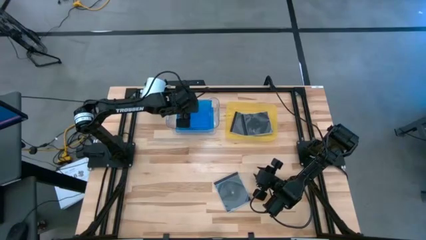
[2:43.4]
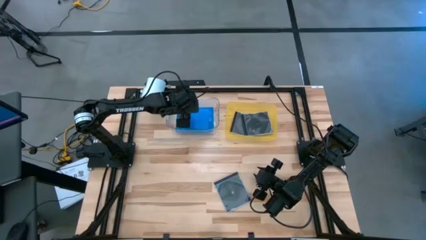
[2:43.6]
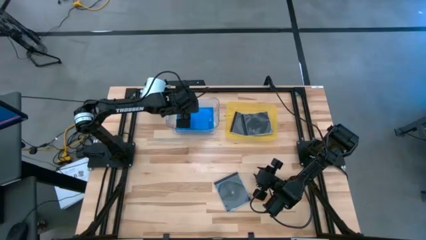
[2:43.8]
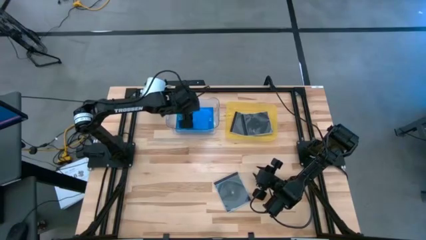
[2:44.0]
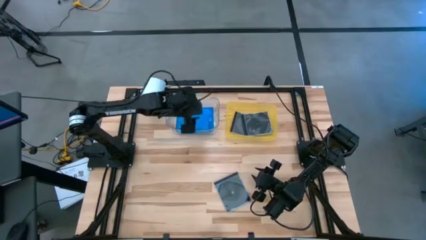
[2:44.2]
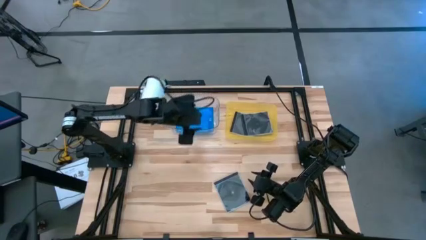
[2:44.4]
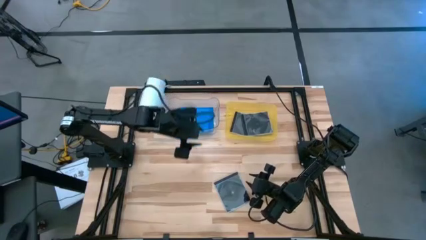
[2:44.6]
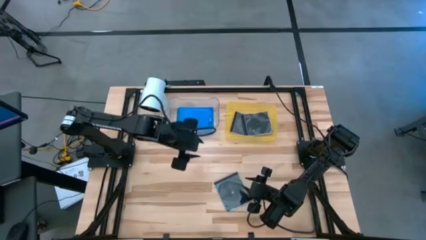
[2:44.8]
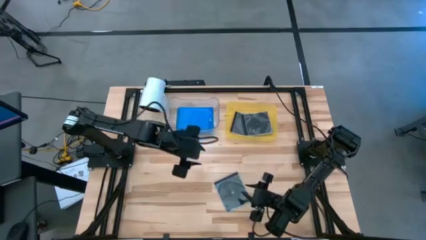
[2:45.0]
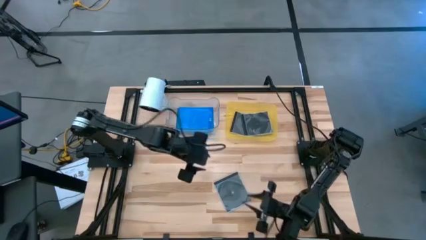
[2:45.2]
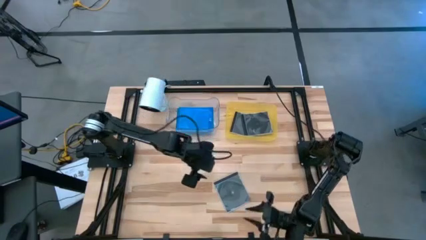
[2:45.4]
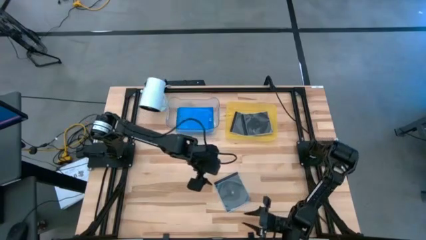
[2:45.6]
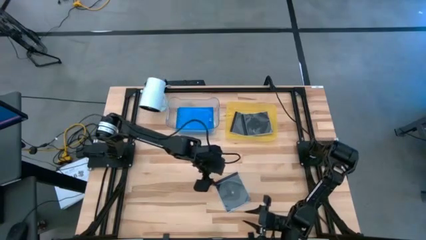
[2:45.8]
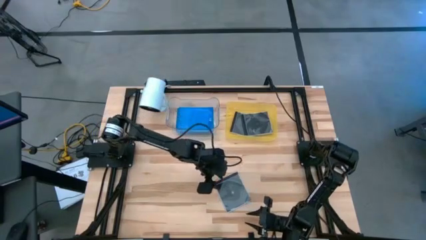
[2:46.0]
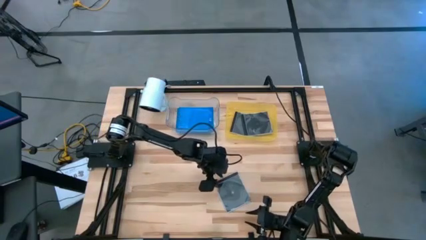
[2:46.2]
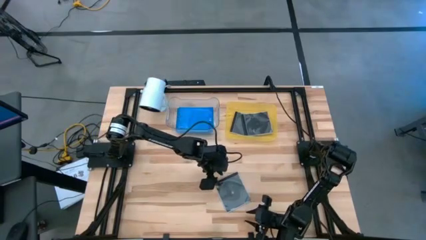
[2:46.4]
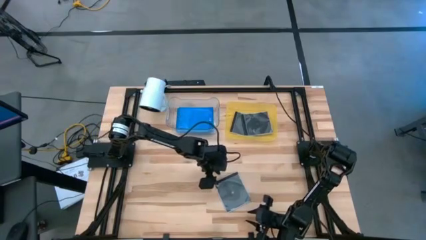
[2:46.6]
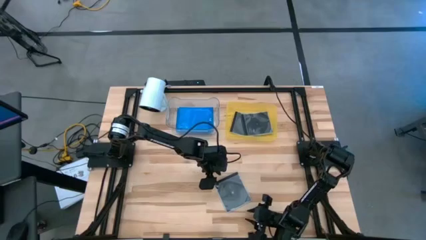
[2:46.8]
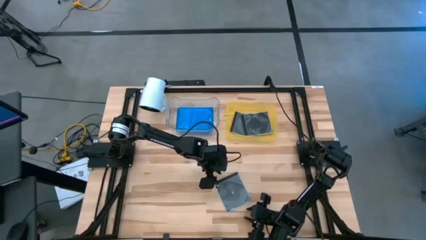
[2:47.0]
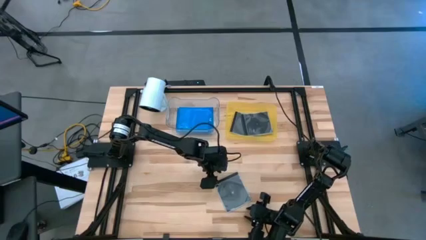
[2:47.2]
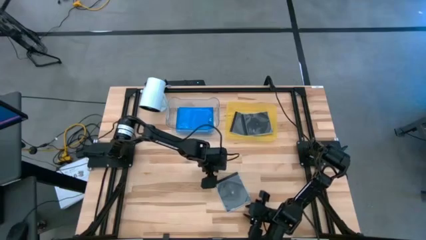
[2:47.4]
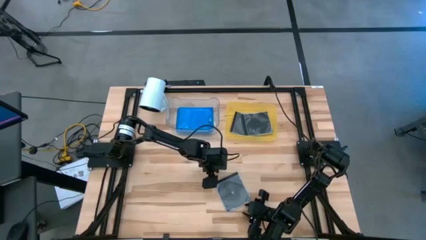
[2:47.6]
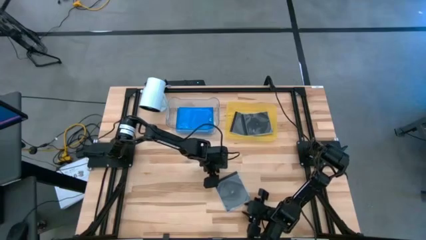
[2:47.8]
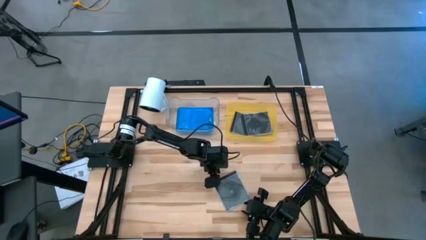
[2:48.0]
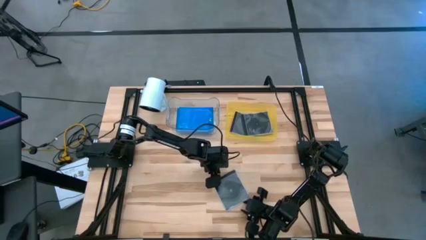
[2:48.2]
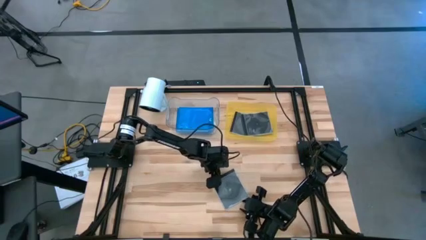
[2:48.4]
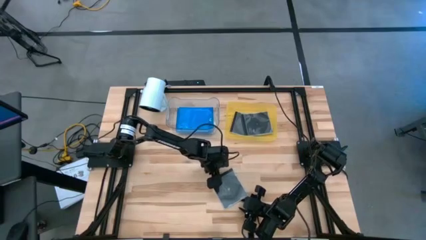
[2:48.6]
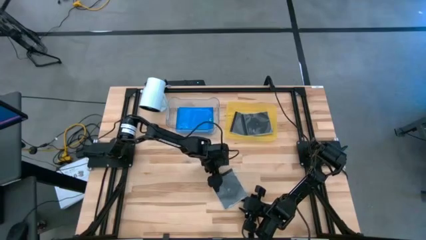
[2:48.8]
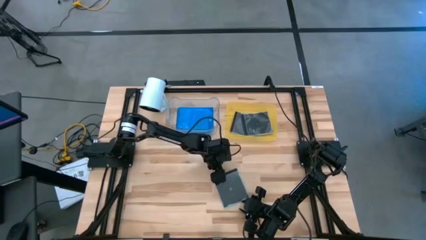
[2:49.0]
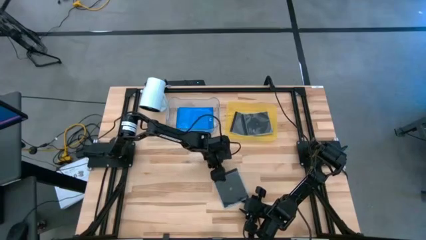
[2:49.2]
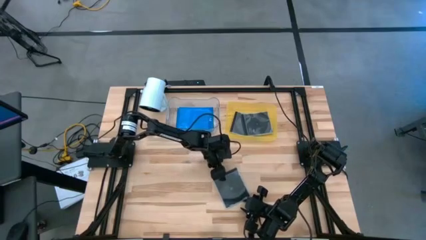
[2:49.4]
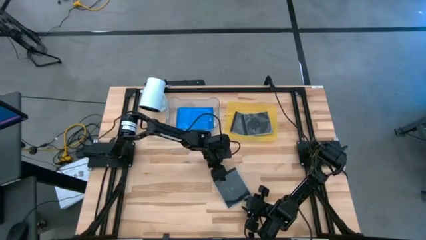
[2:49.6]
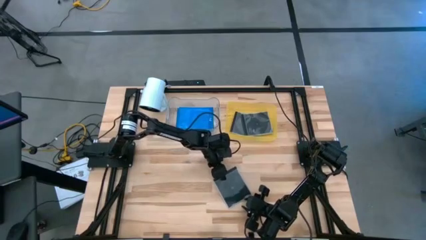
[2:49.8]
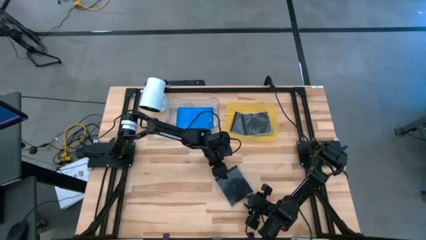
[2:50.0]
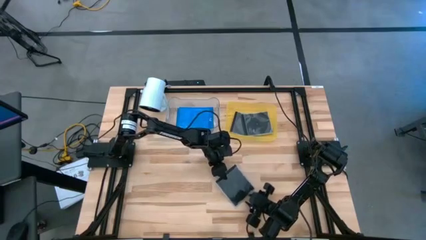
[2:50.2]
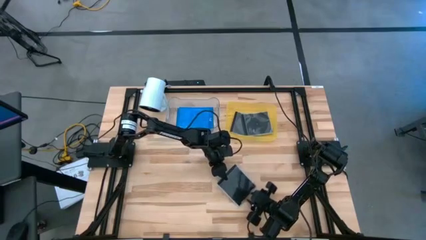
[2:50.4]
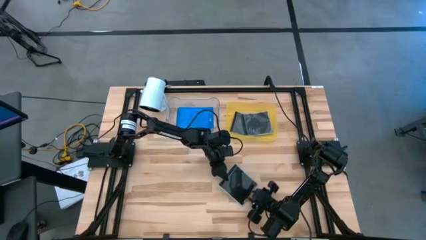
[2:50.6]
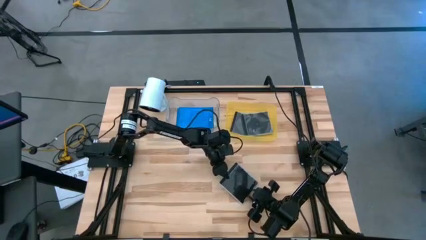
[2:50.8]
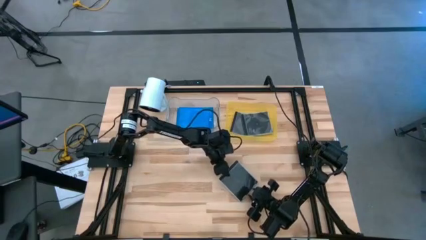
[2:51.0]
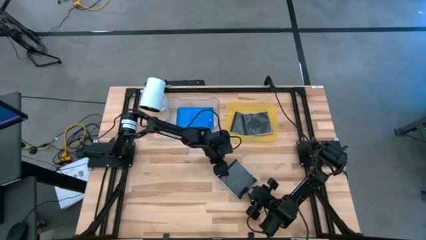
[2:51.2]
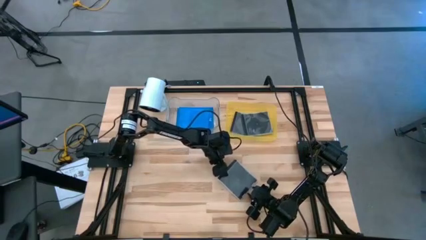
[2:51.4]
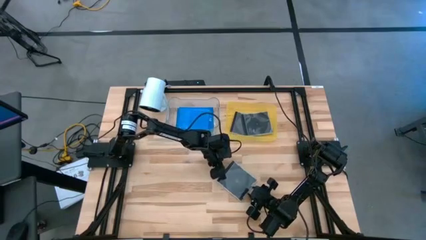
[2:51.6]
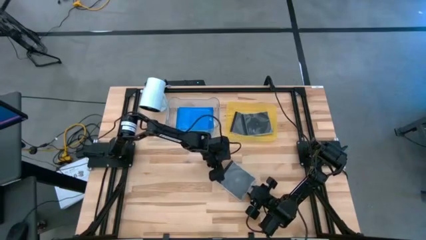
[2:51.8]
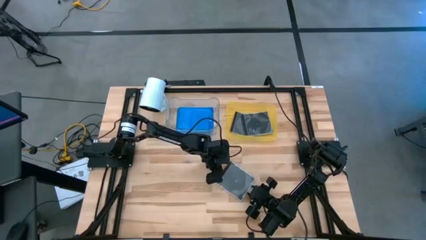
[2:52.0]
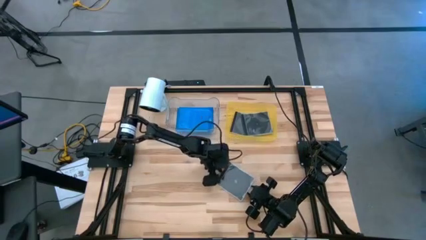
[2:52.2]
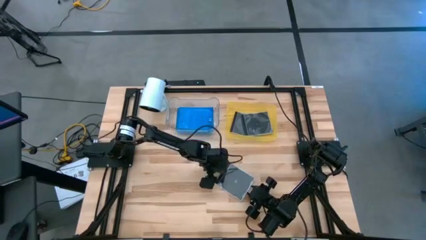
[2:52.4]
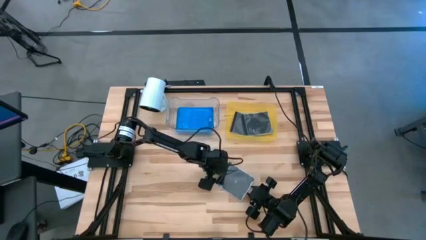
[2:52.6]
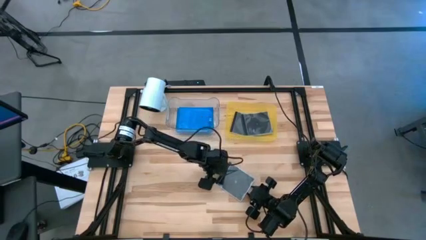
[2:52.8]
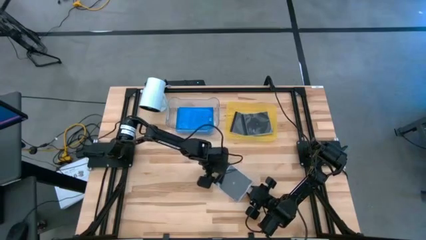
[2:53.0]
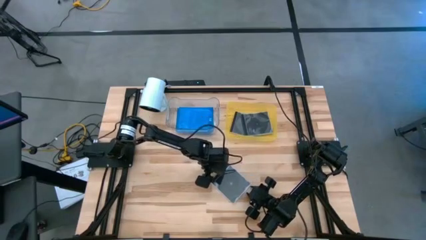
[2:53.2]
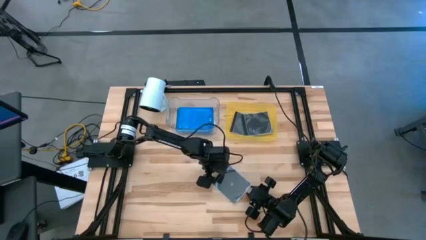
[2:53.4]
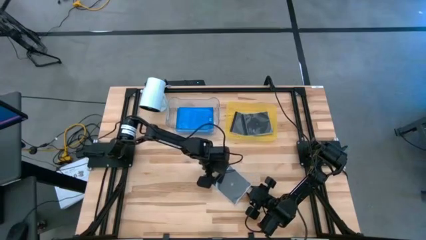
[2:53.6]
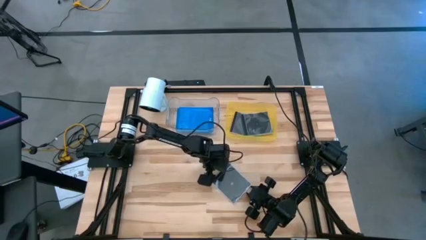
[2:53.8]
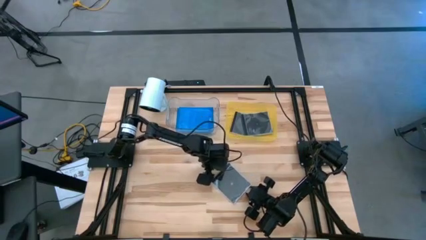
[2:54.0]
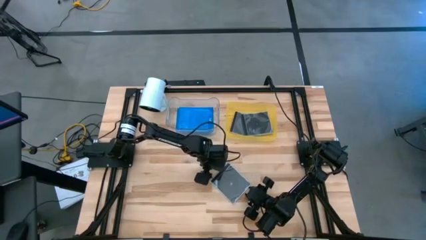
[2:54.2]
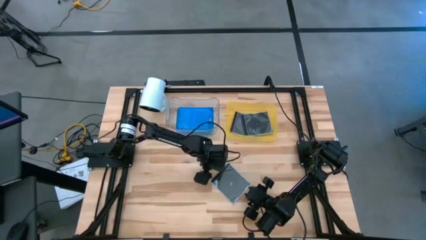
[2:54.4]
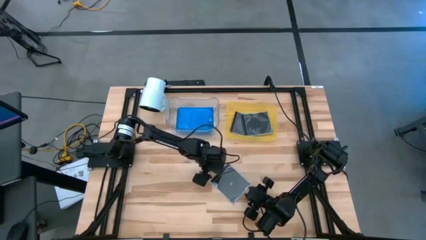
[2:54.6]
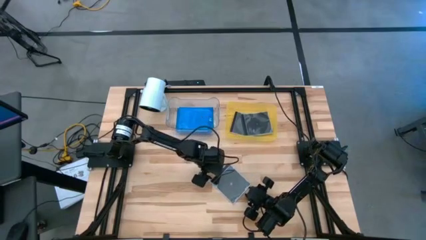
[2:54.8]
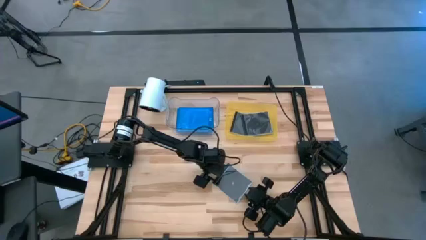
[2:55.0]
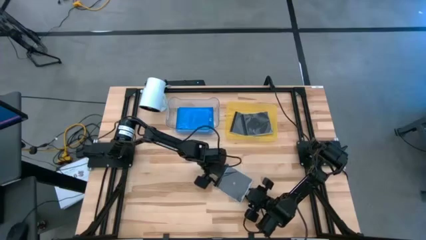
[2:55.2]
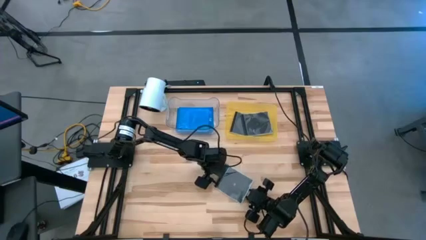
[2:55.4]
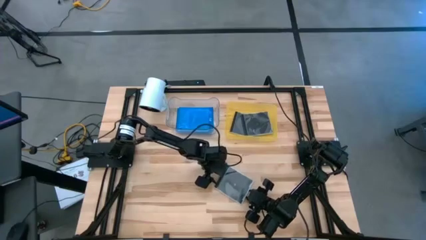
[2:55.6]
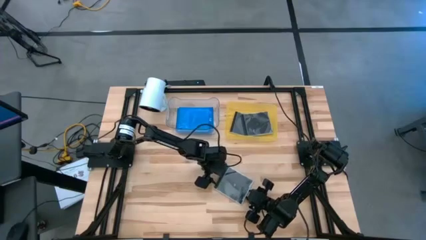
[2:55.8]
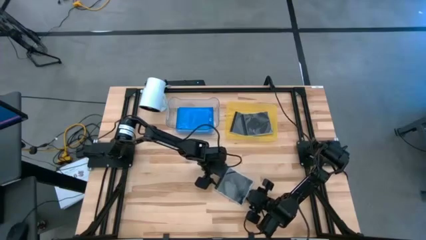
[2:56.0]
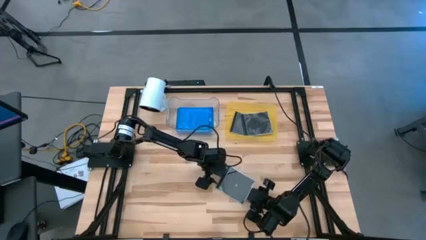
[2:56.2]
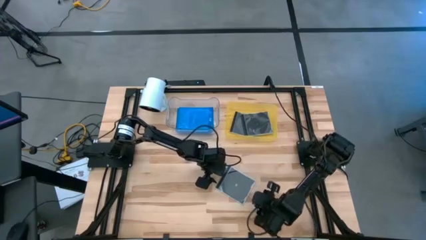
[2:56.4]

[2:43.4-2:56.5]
Task: Pick & place jewel cases by type
Put the black CD case into the yellow bin
